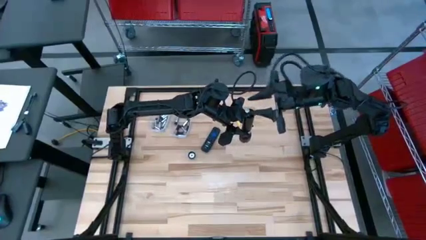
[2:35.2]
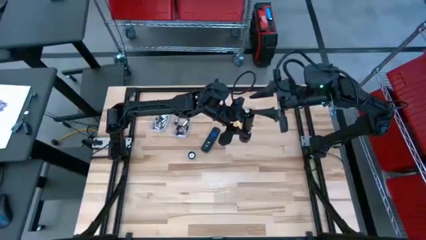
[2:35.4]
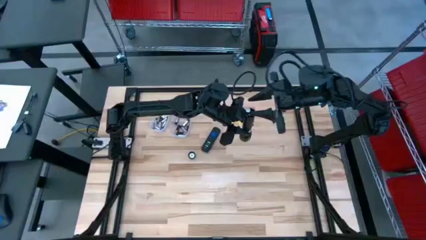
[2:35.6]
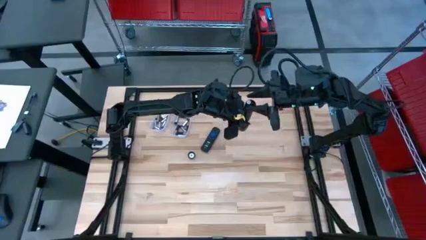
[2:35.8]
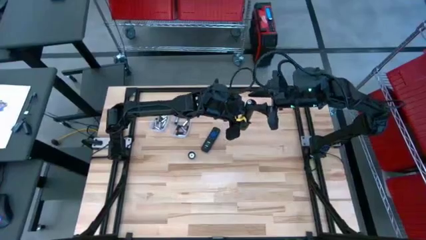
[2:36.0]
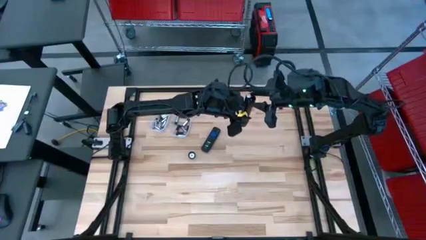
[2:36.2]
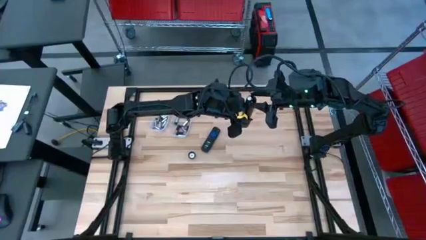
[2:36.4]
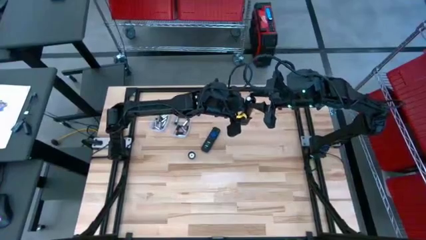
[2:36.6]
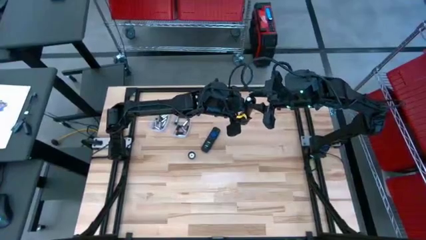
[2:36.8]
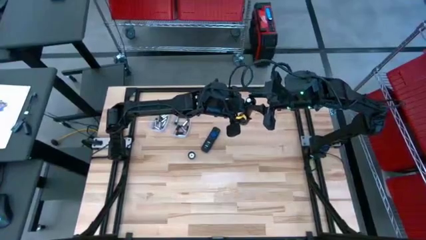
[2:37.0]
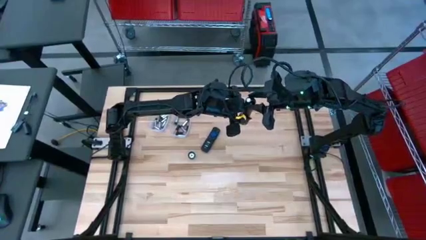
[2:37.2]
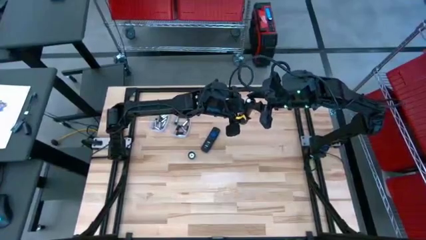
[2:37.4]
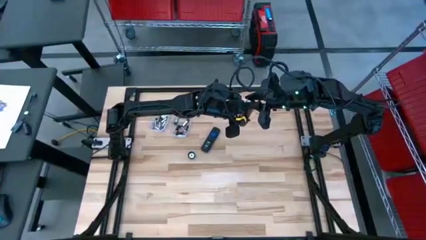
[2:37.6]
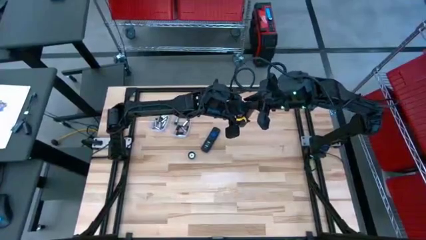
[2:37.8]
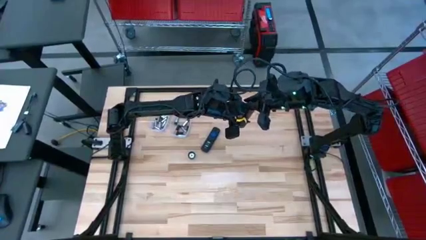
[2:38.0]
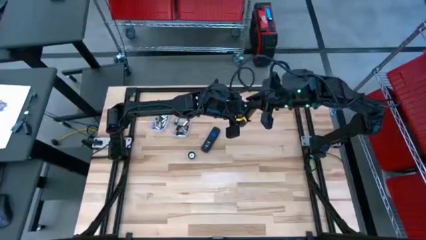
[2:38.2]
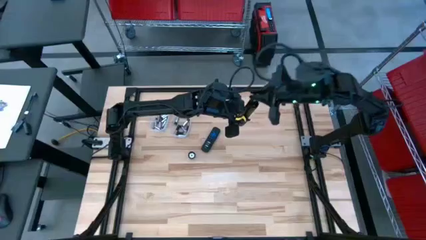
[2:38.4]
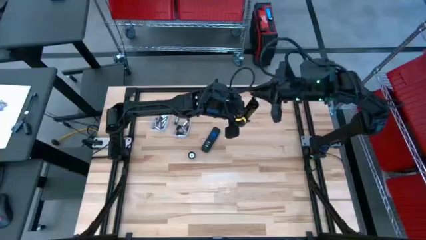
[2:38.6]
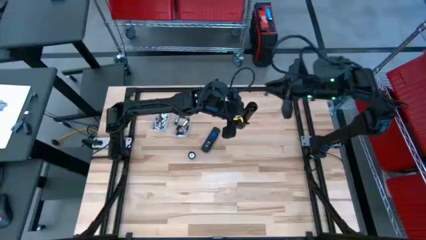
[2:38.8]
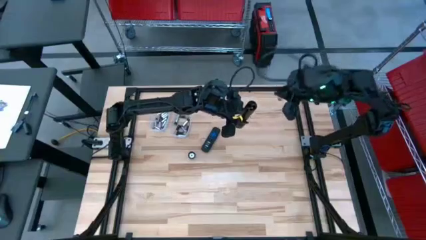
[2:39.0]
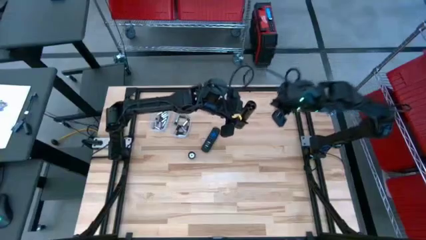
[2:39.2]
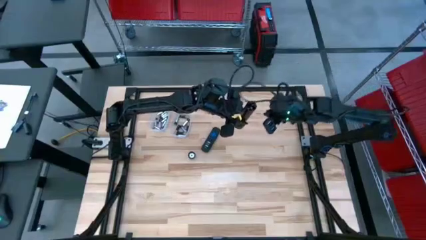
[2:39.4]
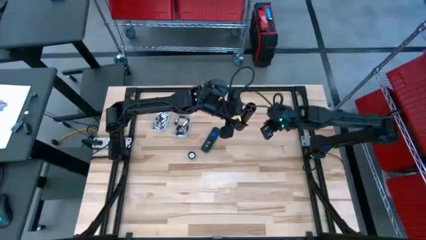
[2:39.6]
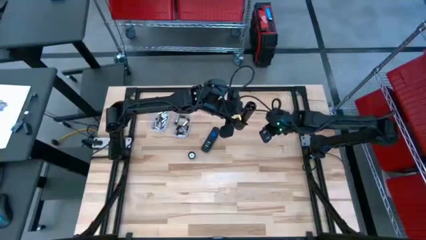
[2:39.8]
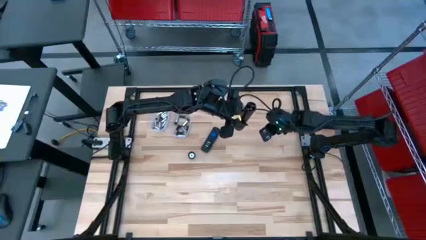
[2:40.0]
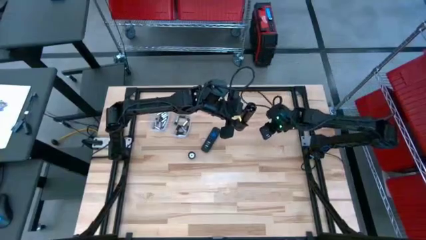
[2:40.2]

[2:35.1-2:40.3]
Task: Insert battery
Remove the silver battery from the flashlight battery compartment

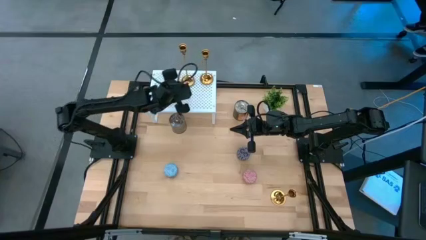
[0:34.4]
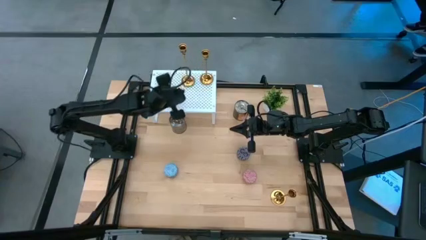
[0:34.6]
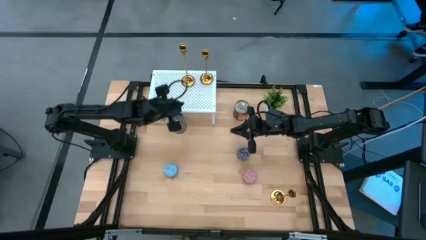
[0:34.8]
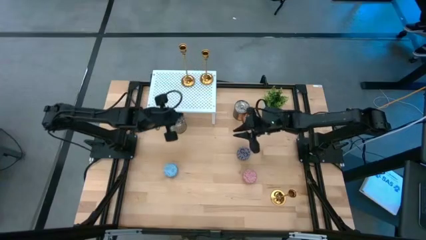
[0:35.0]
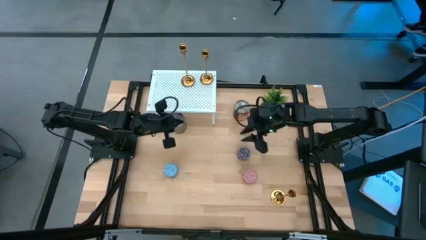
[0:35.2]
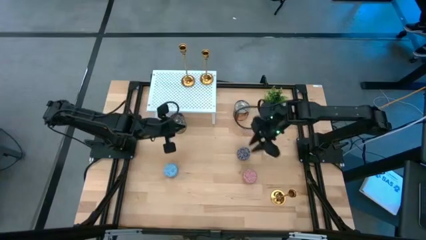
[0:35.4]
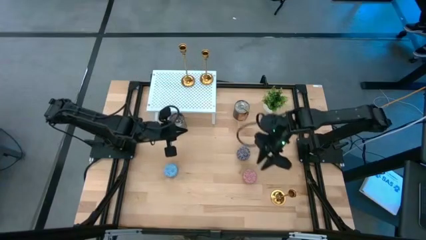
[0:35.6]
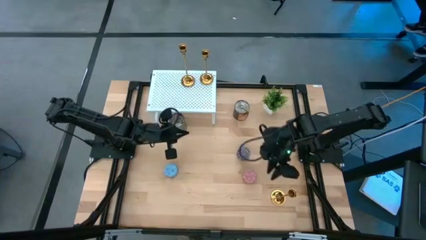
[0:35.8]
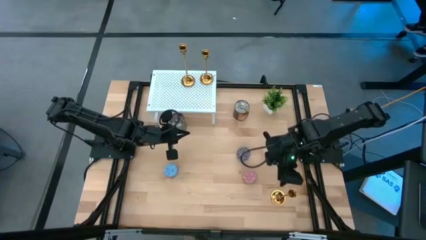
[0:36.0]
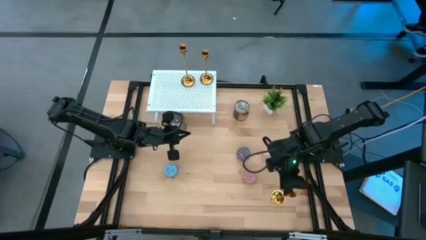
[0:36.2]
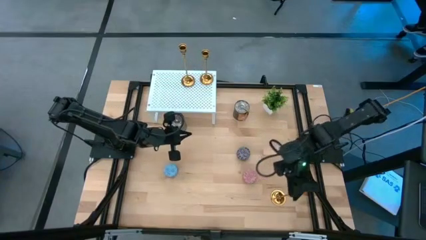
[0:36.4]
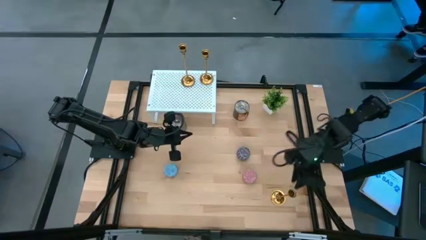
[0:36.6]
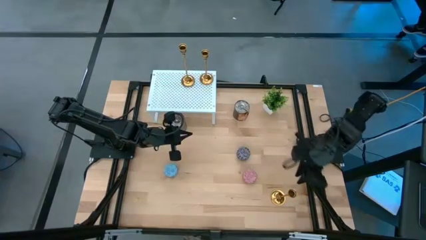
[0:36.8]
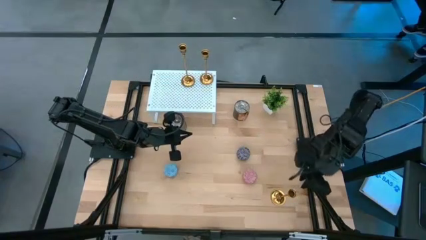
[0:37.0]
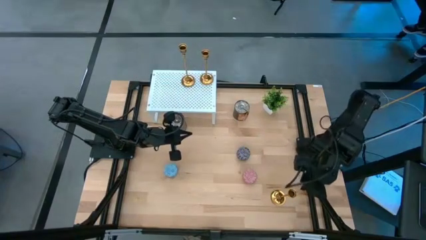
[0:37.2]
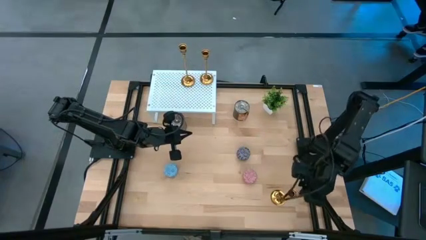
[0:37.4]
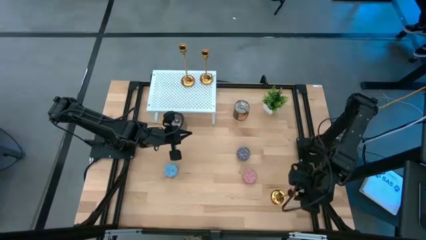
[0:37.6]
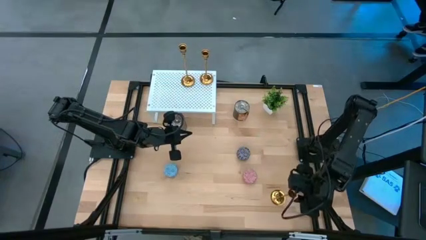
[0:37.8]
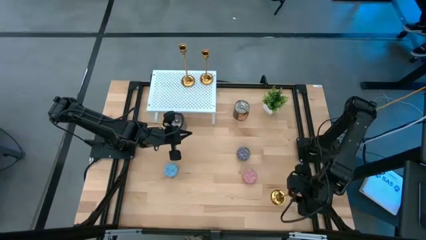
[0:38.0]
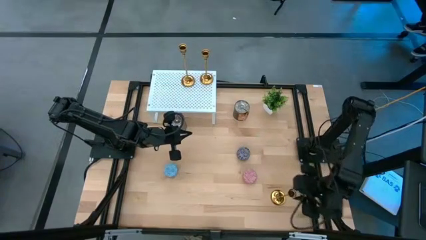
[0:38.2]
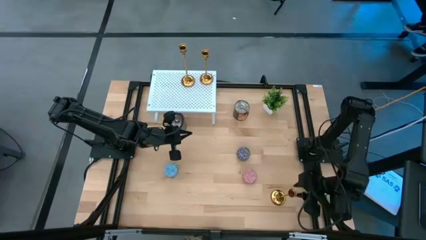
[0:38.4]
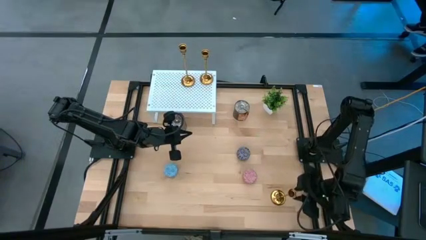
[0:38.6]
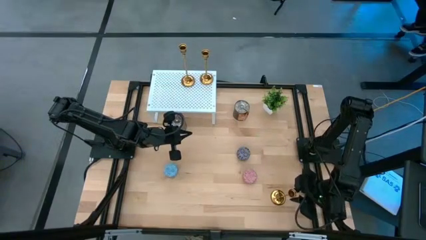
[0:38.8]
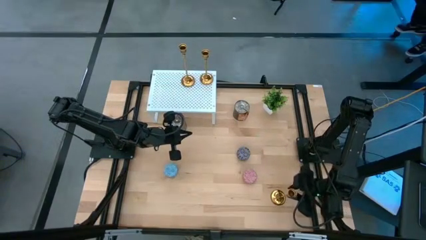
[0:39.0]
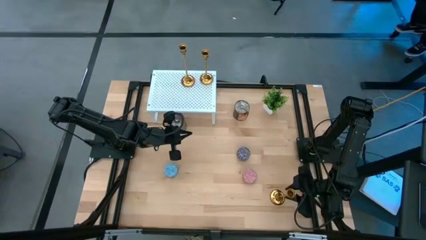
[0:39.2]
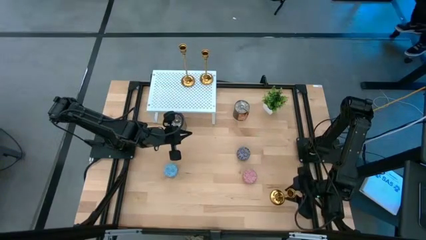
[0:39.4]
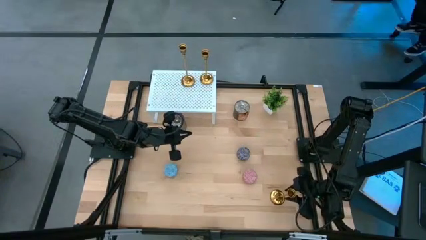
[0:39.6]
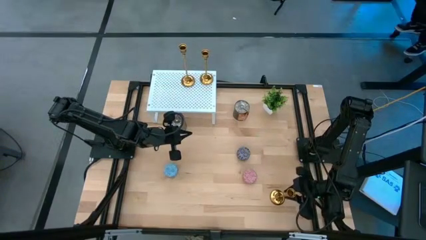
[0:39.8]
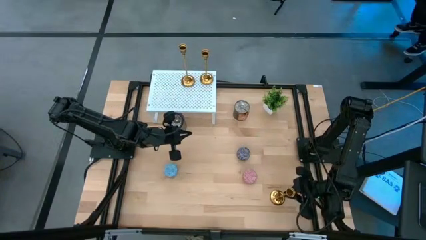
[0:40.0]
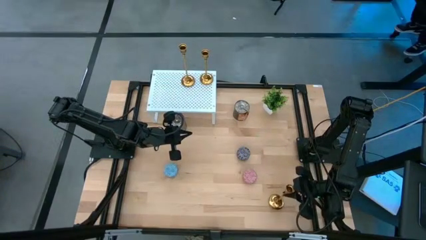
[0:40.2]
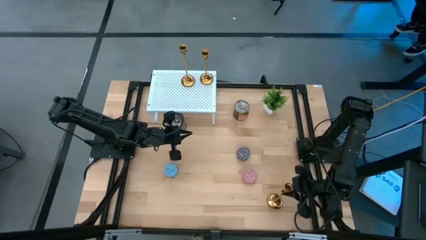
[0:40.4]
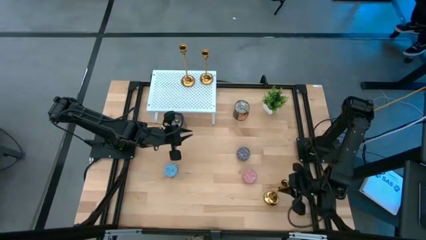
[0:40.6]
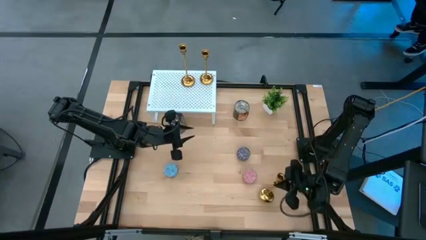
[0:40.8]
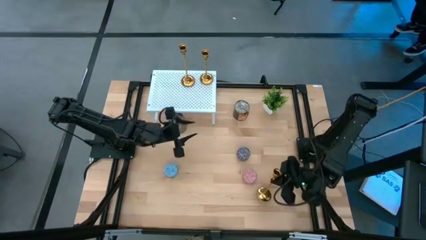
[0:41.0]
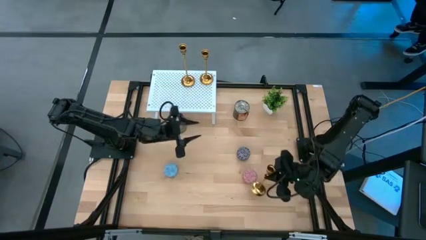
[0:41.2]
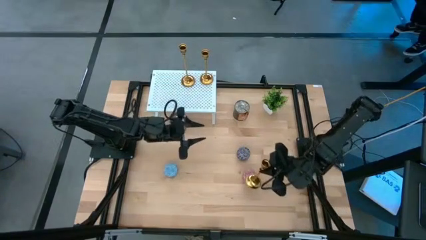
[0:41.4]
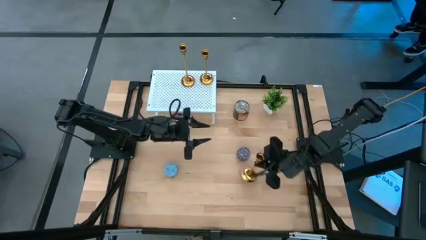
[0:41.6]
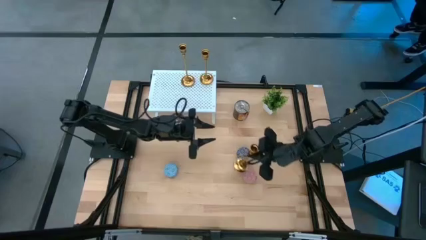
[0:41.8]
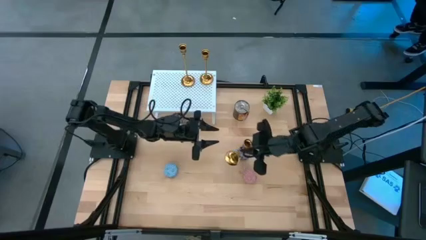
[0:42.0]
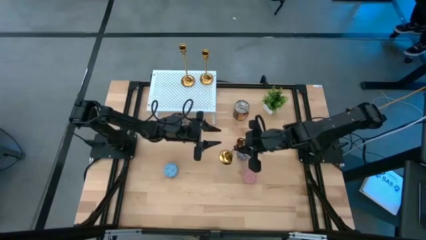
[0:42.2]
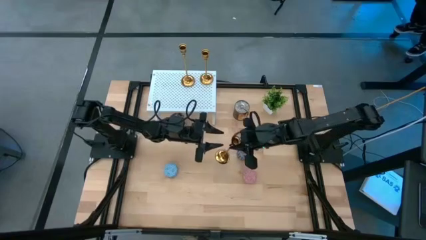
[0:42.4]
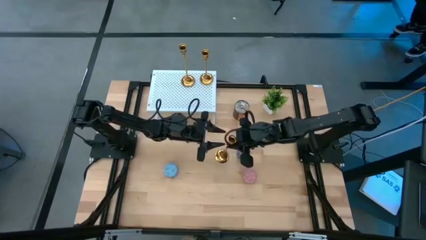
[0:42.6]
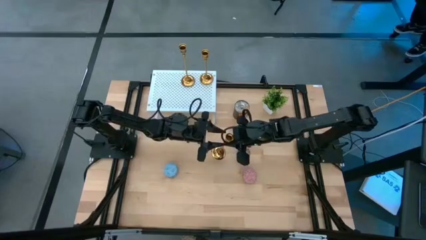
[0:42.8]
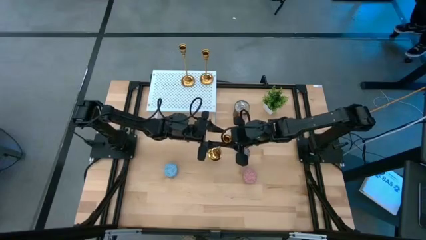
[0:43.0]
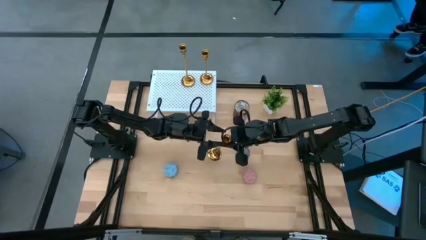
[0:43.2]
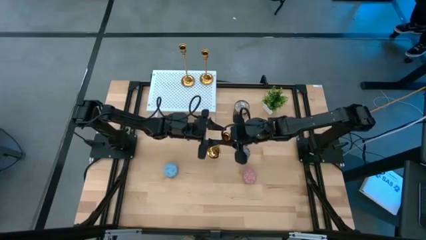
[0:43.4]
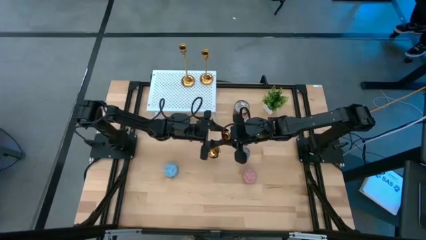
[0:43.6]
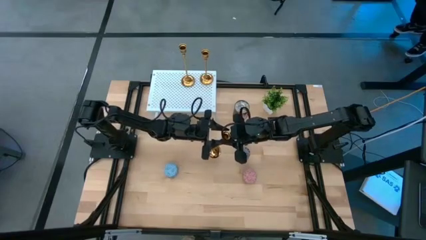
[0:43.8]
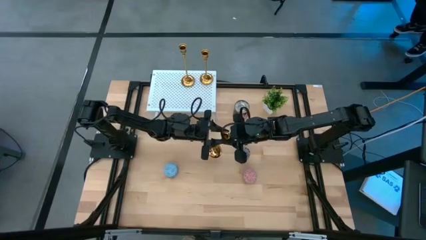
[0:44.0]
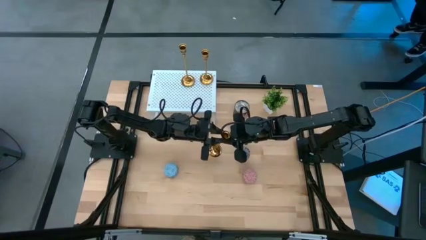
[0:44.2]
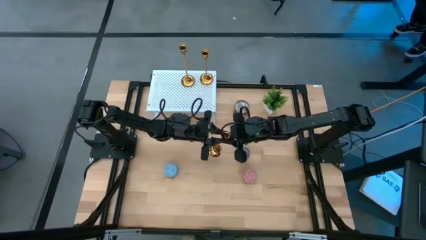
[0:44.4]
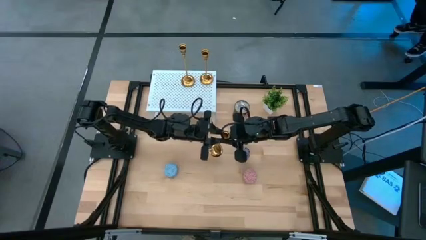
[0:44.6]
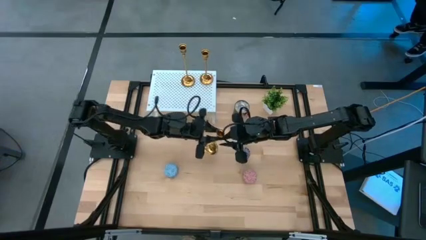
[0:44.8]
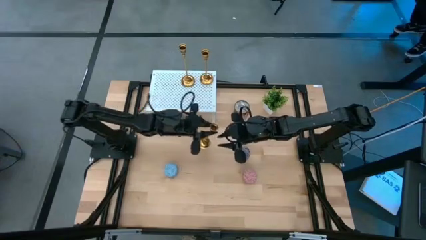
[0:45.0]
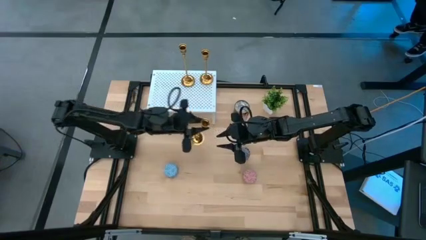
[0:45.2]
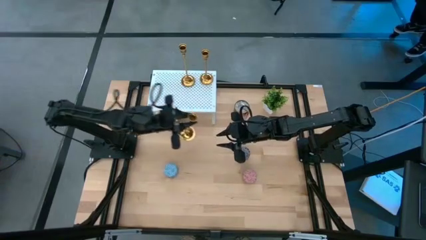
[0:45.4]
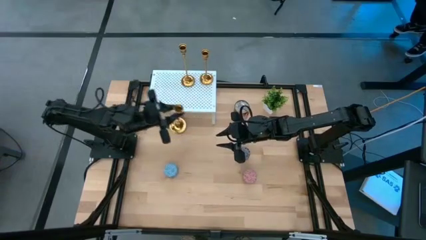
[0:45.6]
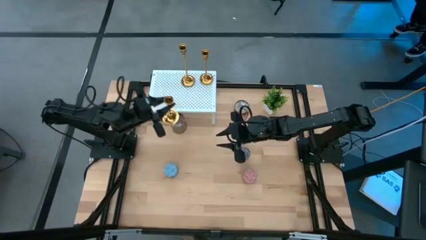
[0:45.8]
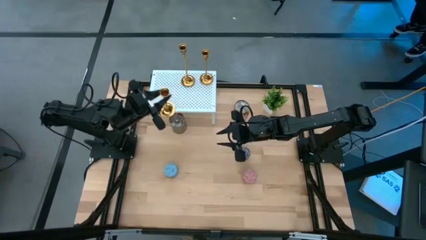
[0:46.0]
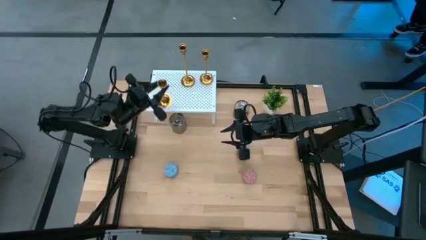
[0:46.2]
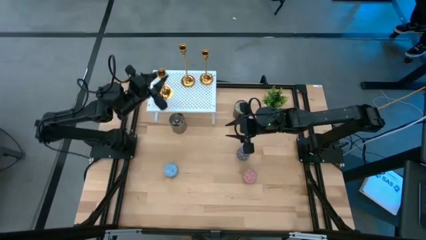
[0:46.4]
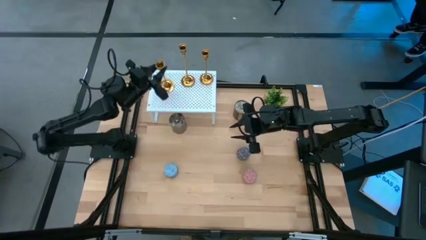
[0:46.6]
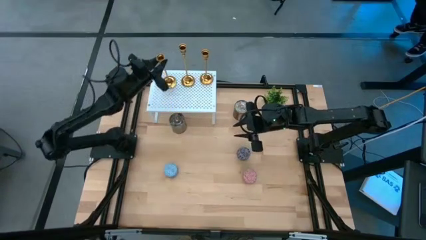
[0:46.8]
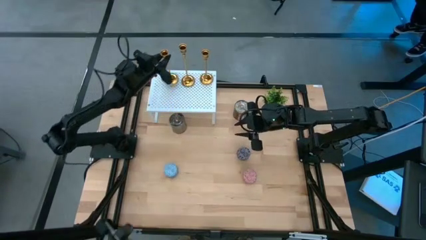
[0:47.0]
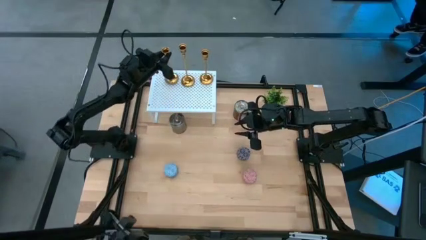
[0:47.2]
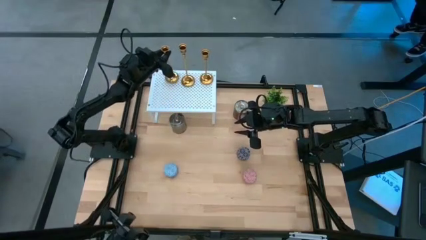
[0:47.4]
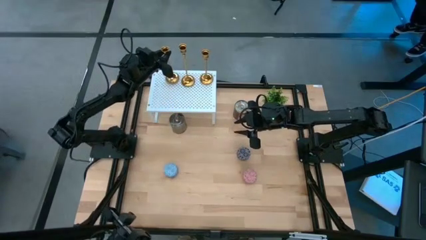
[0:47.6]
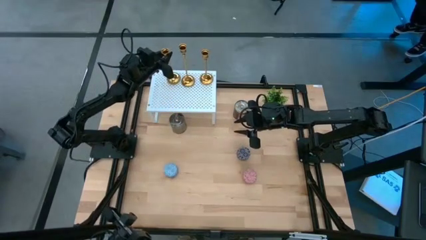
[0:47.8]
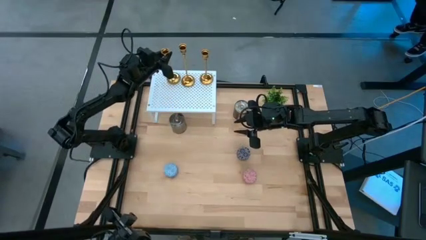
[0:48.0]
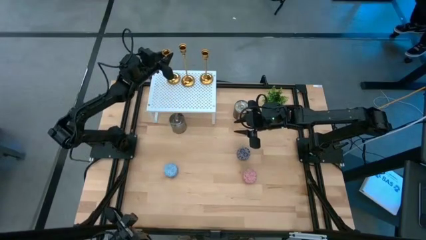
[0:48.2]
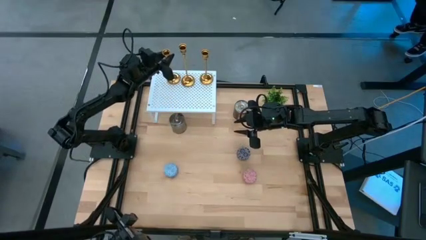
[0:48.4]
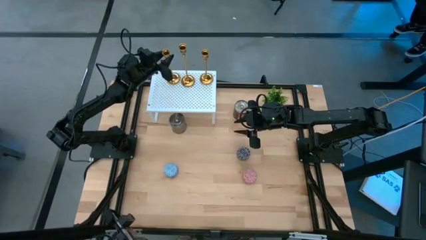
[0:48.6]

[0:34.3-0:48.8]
Task: Pick & Place candle stick holders
Put the gold candle holder on the shelf to align with the other gold candle holders
